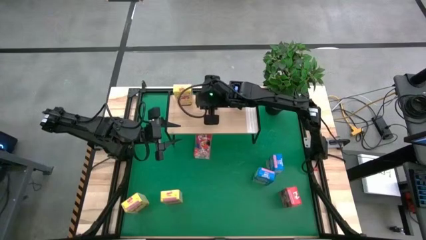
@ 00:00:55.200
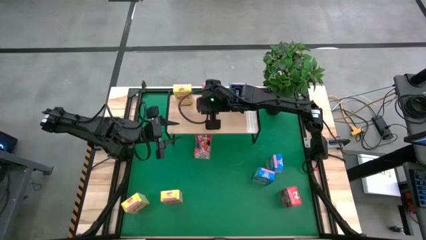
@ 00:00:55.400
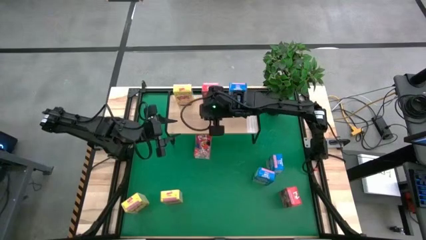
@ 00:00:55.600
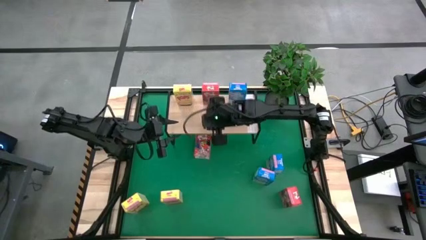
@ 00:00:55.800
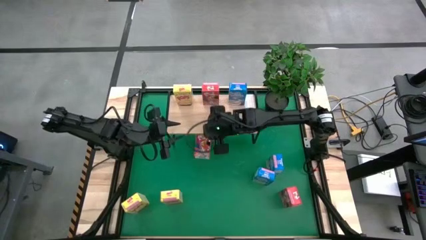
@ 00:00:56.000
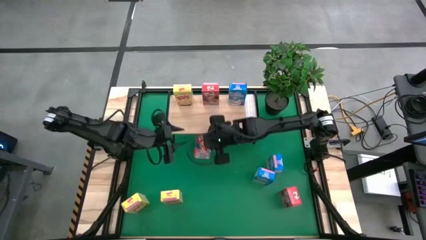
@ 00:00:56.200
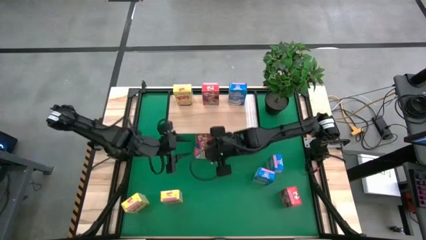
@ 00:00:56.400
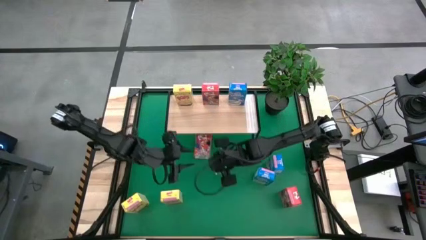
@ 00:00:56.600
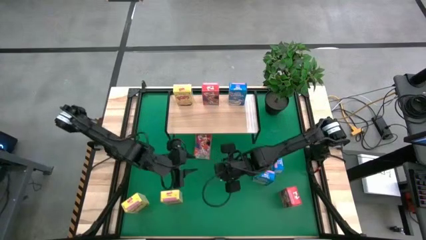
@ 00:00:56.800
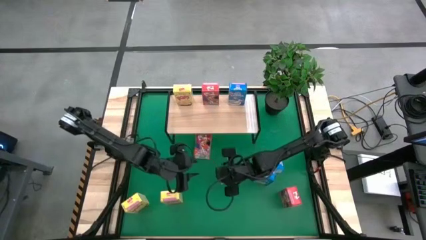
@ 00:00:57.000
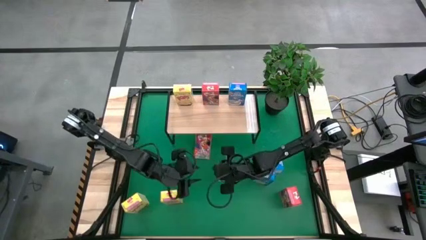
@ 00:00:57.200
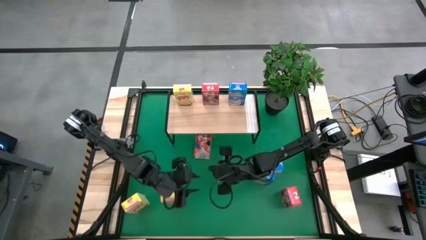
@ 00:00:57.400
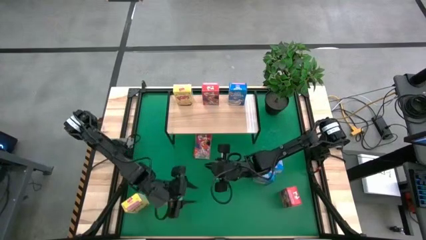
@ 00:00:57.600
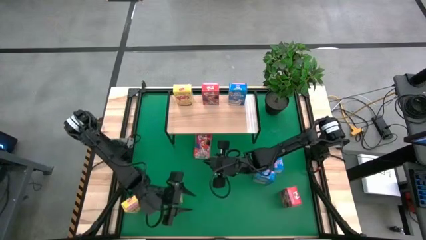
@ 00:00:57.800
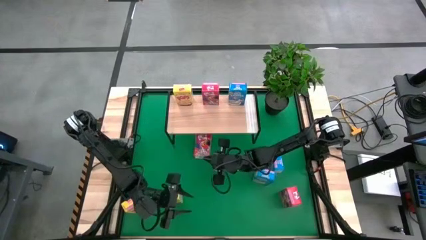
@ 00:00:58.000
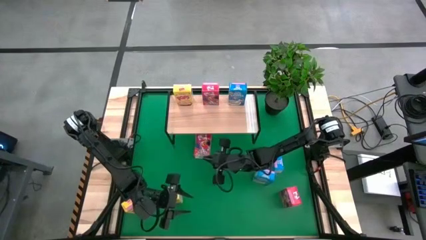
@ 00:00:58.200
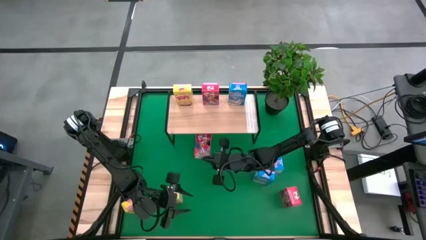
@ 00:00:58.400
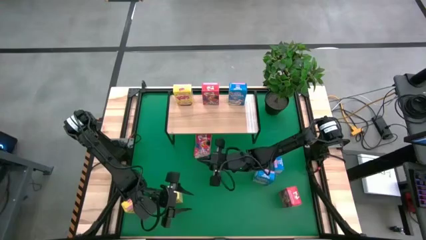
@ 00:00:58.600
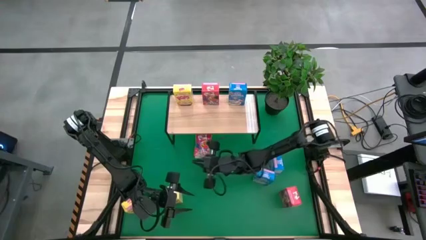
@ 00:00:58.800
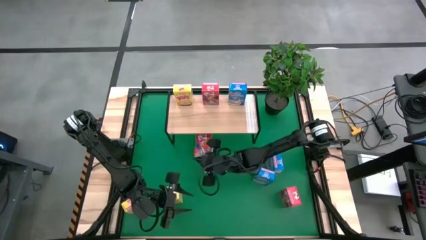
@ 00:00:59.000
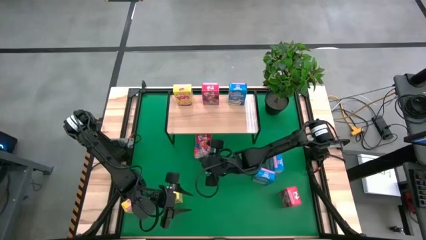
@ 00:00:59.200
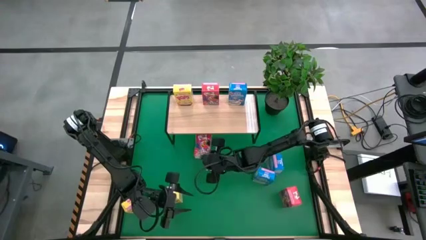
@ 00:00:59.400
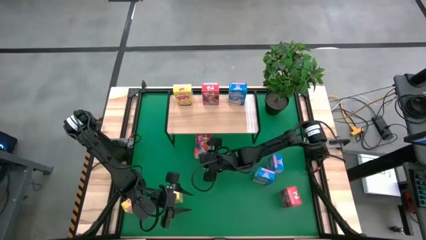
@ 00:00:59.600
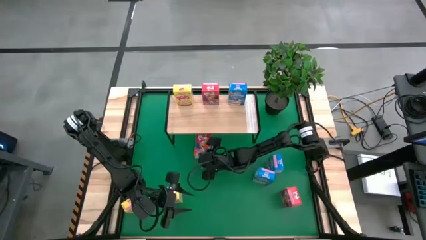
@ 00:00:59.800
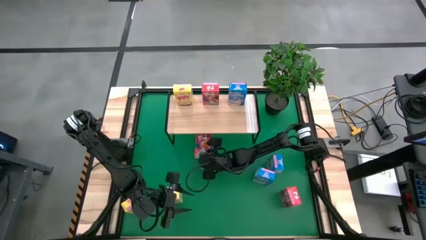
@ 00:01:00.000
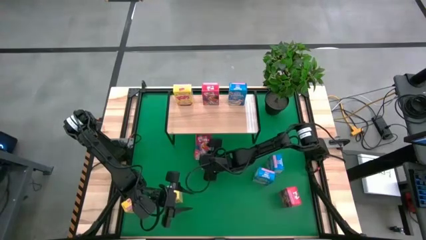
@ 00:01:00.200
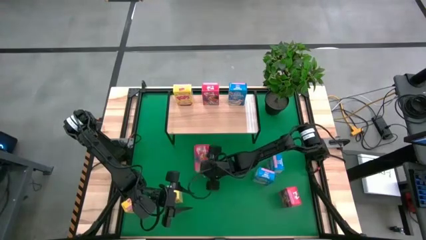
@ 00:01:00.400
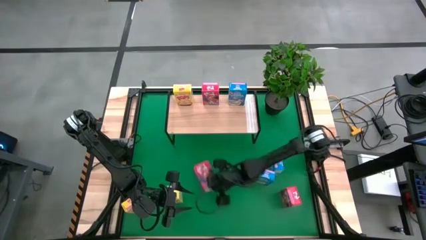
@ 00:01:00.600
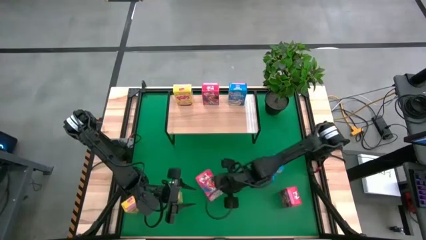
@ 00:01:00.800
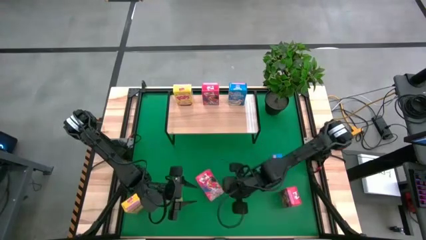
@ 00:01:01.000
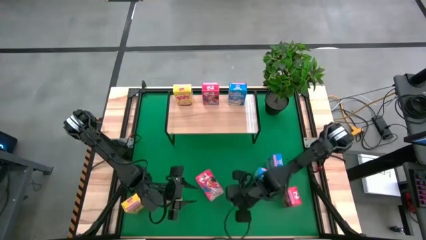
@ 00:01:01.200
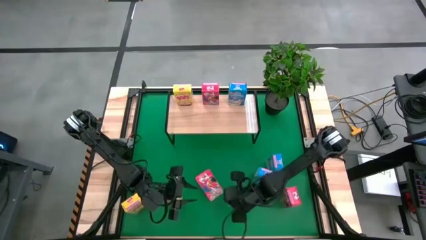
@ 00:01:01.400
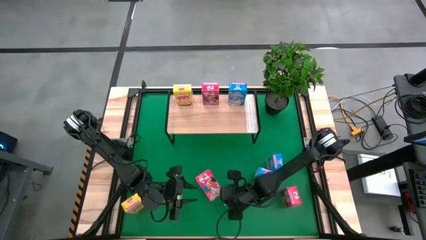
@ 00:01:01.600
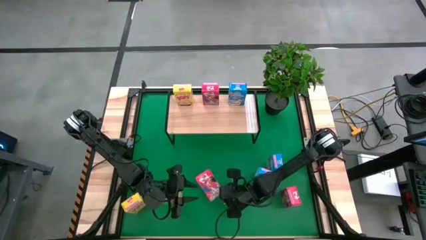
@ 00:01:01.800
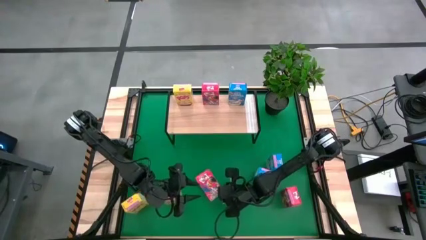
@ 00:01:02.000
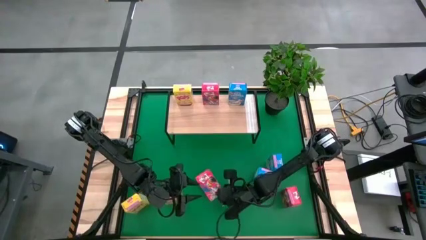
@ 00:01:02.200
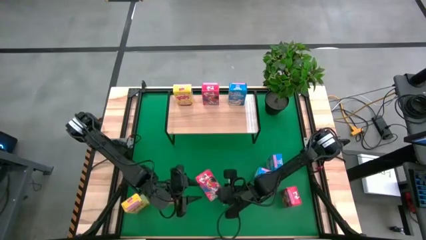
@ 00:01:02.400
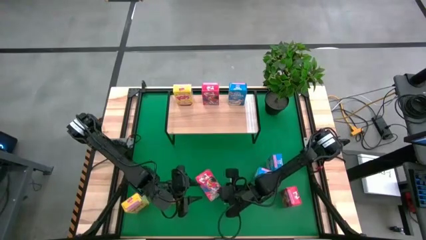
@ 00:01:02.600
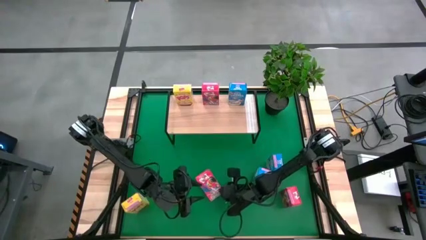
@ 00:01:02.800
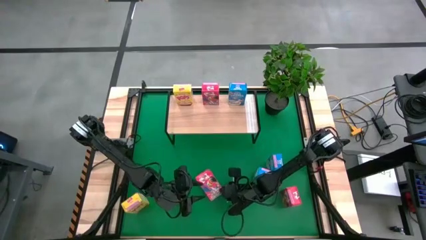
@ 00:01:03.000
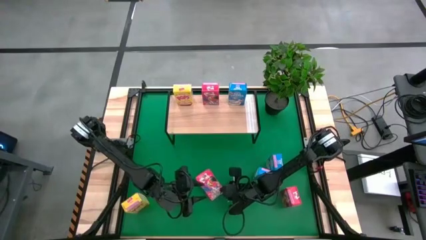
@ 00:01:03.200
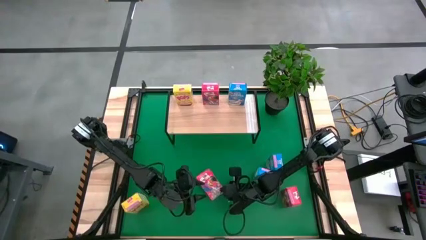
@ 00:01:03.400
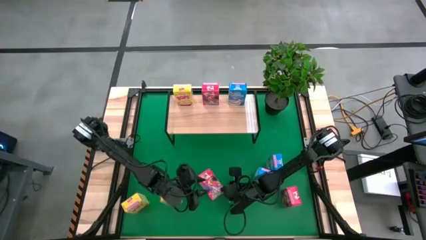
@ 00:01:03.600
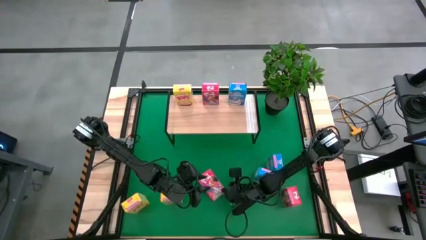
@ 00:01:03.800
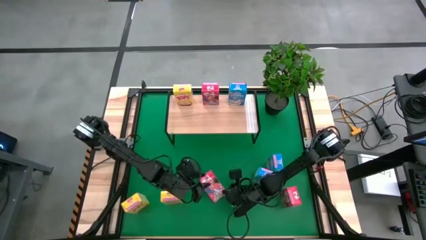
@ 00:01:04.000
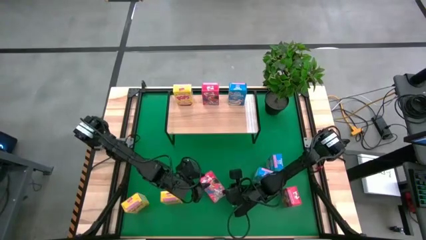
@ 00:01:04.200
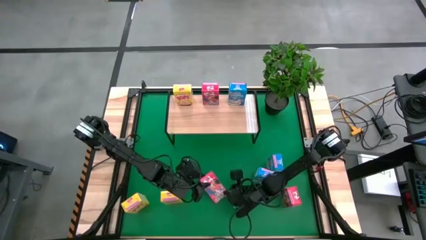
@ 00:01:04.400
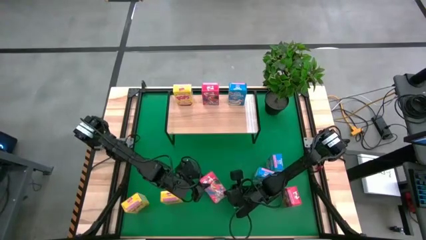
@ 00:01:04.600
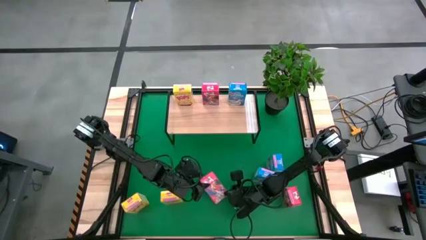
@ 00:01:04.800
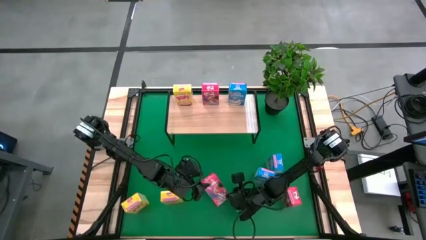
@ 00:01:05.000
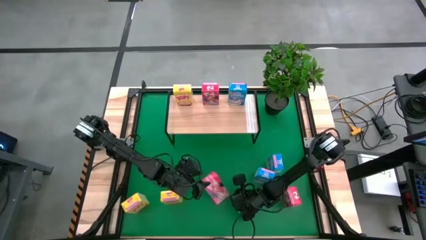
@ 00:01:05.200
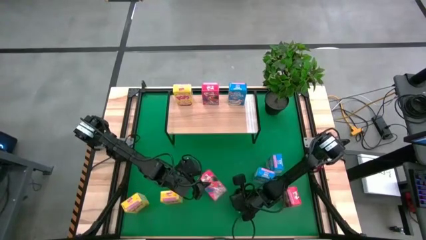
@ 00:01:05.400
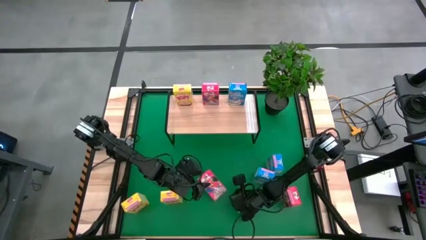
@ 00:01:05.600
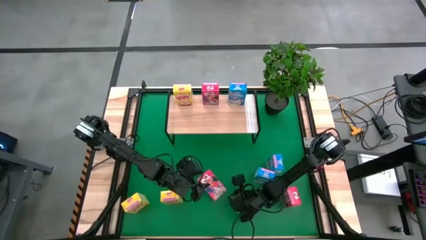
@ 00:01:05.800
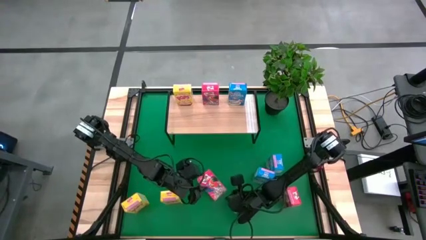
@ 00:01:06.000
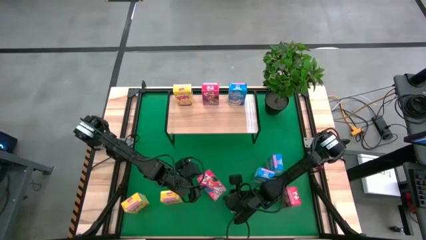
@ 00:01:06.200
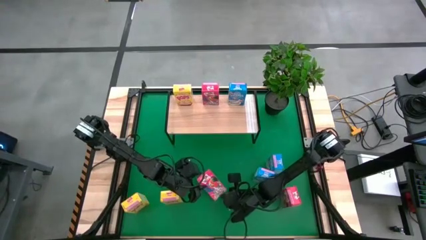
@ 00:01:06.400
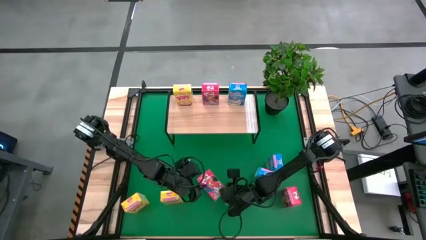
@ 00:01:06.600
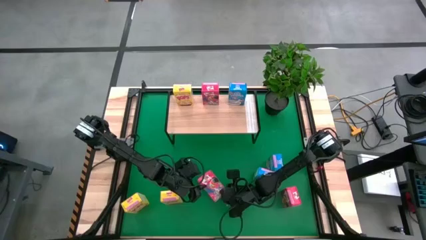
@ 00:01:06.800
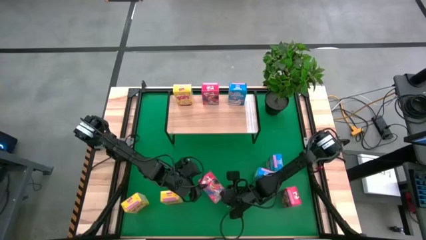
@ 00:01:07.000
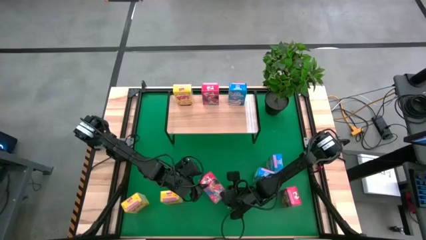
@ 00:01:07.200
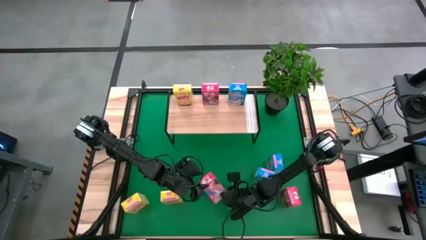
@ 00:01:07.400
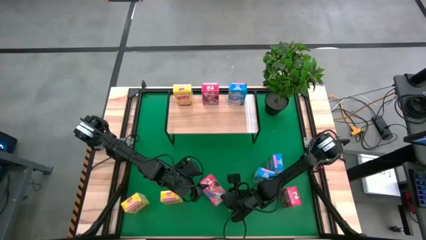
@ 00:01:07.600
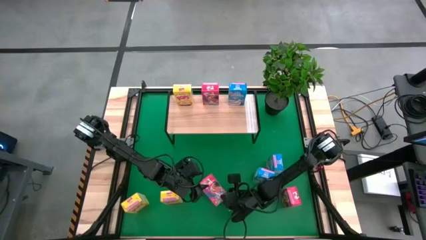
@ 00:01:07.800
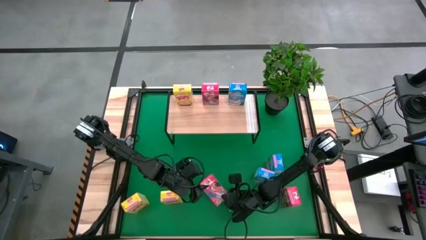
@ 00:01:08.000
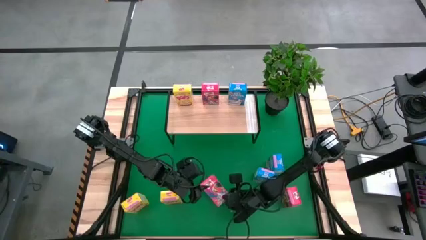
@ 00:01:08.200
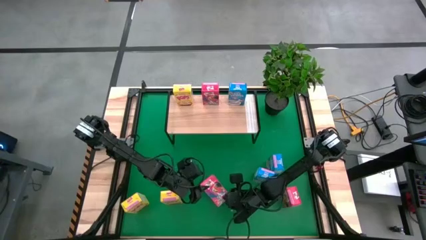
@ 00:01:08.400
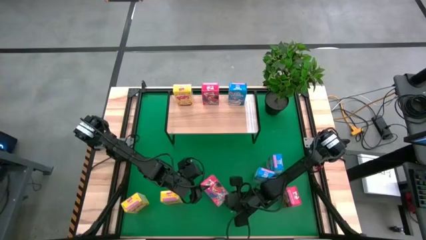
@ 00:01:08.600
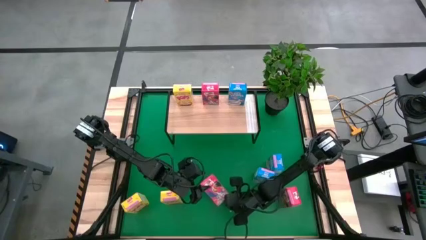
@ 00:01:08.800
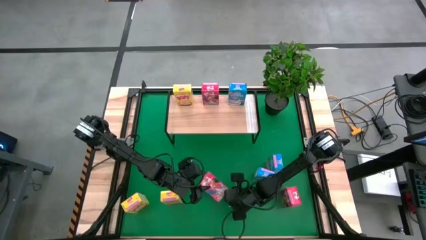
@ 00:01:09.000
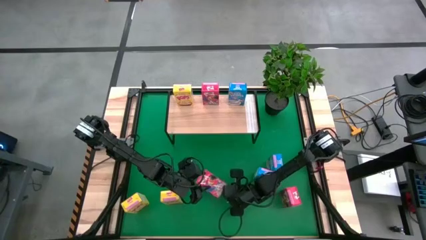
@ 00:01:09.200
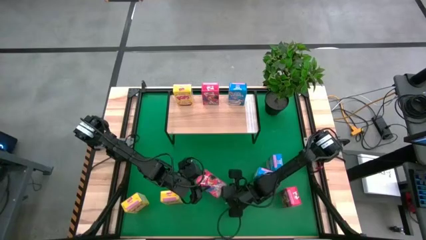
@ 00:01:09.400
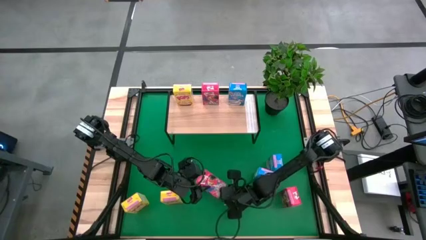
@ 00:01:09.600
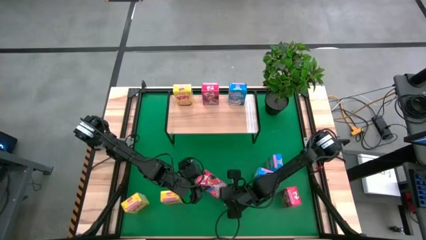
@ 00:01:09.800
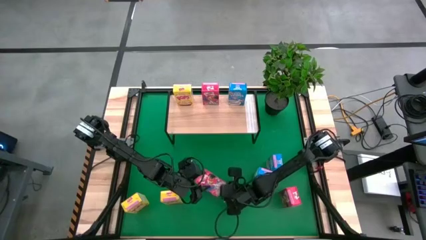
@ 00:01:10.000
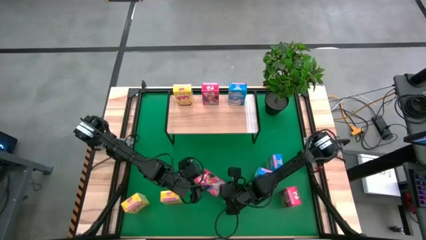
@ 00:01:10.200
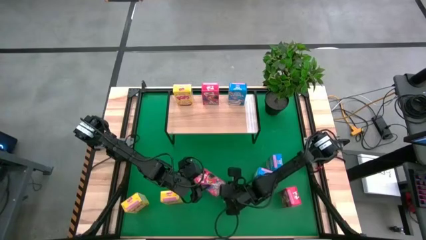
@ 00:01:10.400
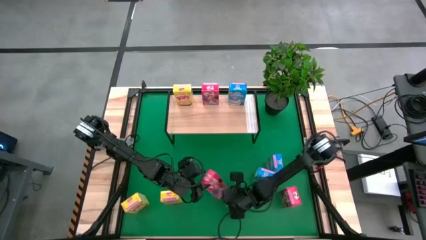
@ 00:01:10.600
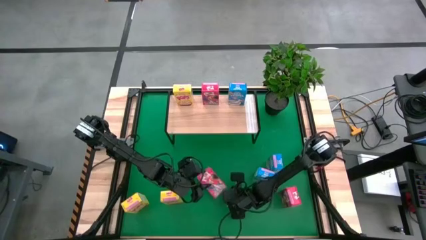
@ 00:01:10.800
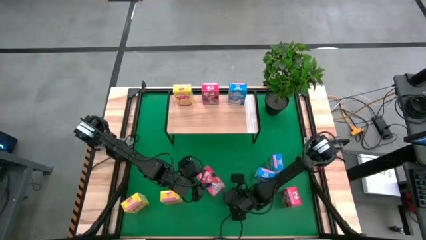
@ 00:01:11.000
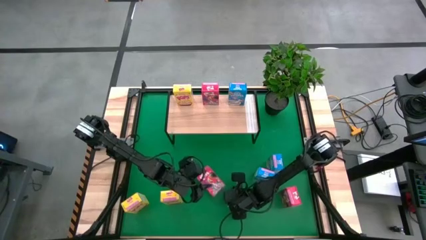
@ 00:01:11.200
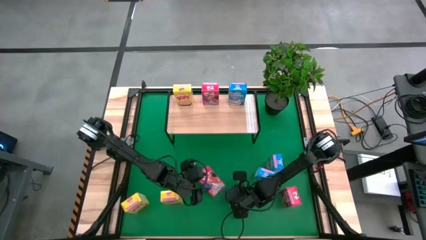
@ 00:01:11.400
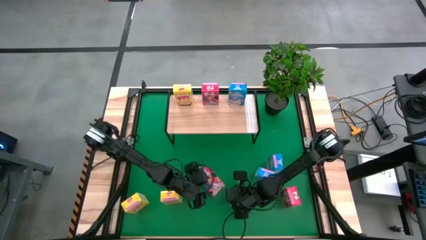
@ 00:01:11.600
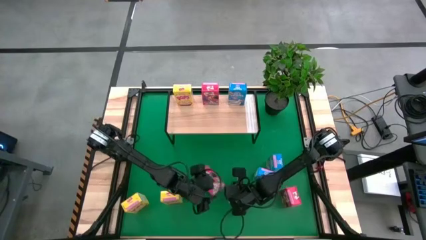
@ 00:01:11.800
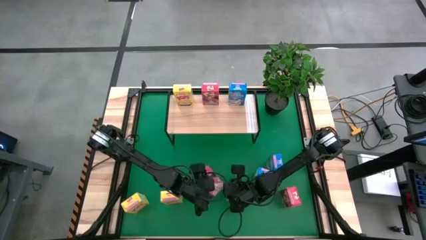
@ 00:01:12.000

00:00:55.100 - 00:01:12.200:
Task: Stack cereal on shelf
Put the top red cereal box on the shelf aligned with the other red cereal box
